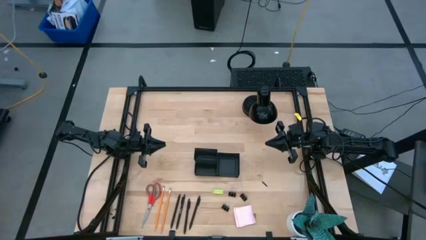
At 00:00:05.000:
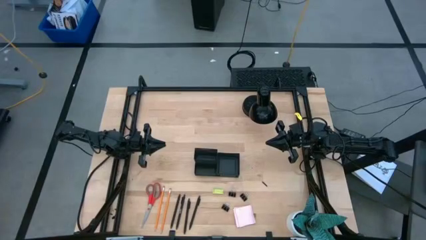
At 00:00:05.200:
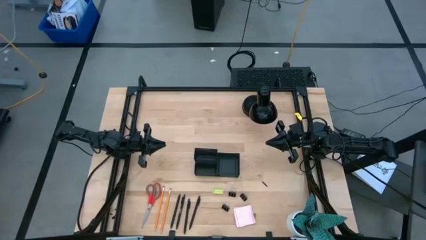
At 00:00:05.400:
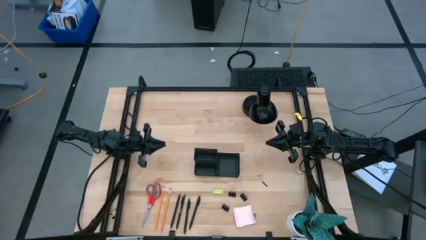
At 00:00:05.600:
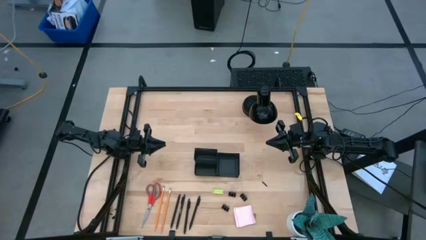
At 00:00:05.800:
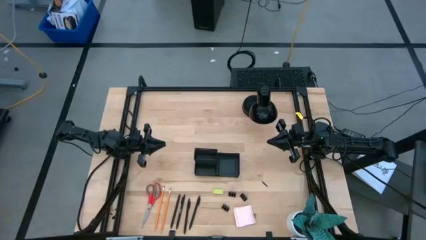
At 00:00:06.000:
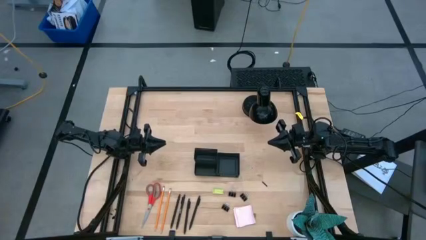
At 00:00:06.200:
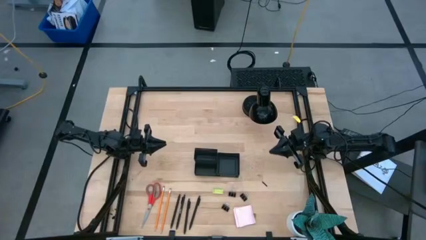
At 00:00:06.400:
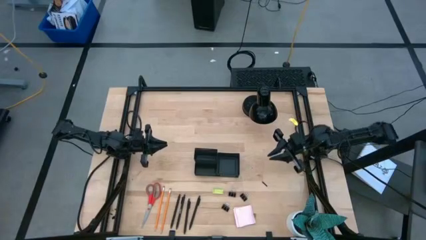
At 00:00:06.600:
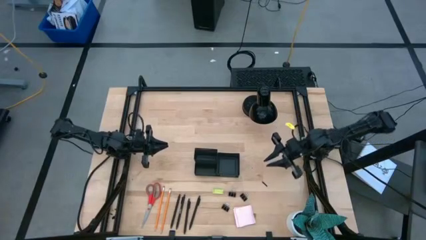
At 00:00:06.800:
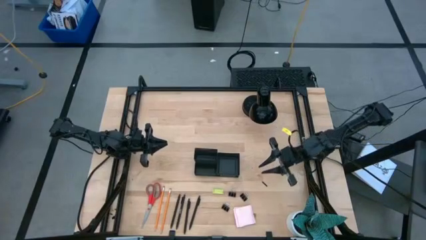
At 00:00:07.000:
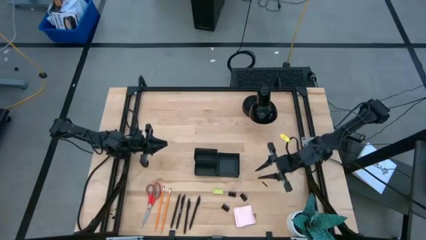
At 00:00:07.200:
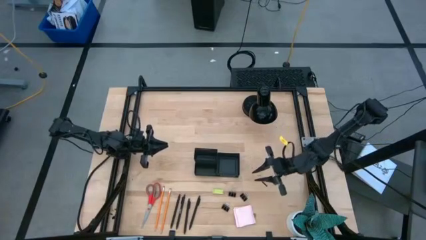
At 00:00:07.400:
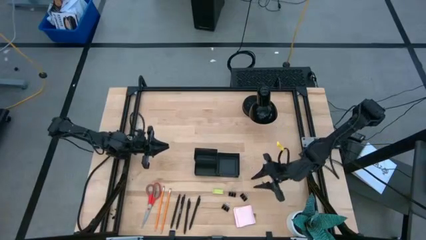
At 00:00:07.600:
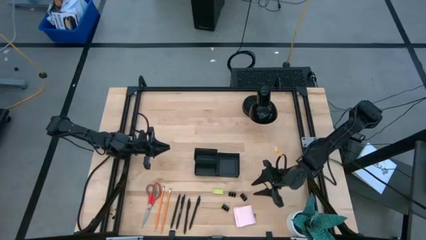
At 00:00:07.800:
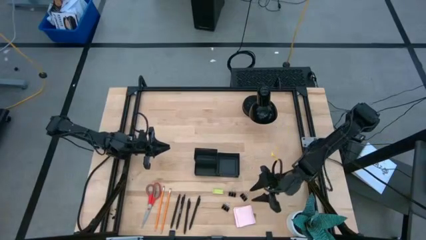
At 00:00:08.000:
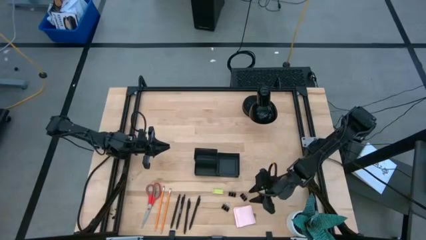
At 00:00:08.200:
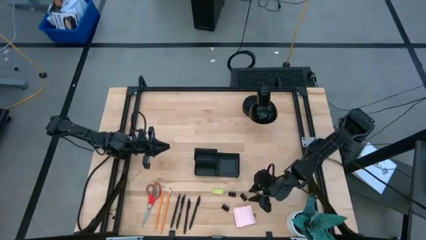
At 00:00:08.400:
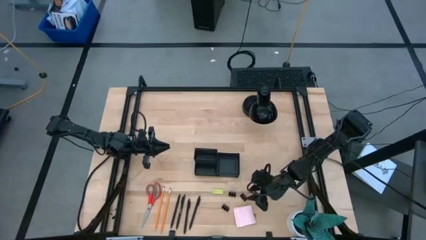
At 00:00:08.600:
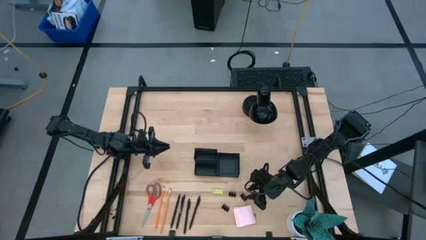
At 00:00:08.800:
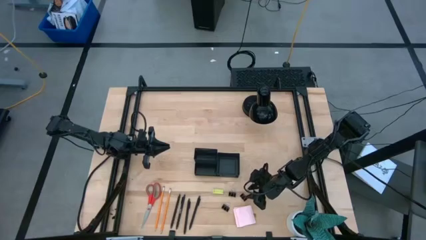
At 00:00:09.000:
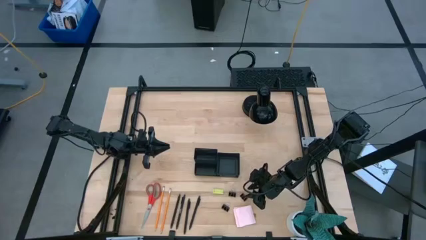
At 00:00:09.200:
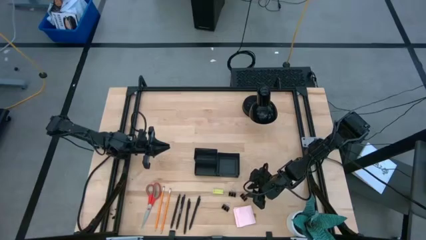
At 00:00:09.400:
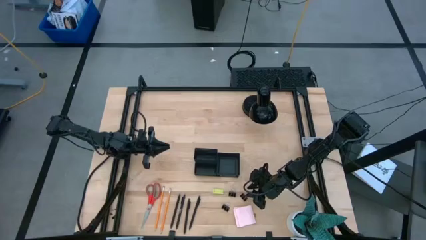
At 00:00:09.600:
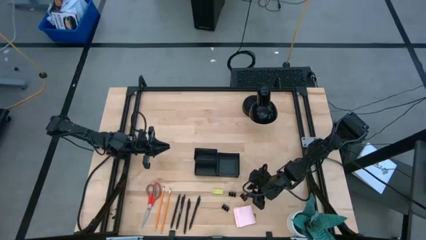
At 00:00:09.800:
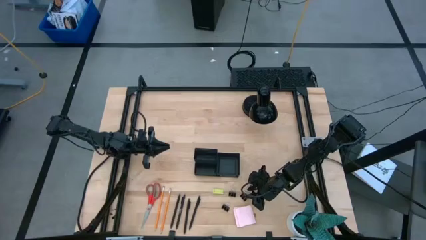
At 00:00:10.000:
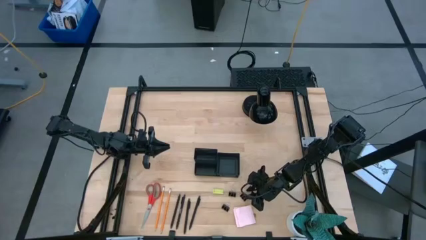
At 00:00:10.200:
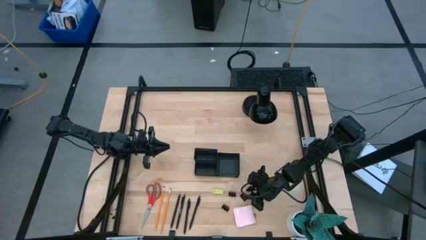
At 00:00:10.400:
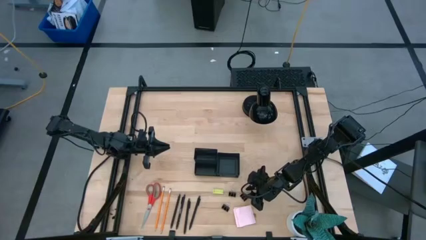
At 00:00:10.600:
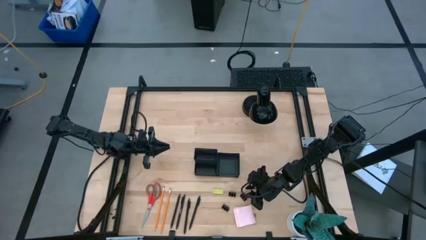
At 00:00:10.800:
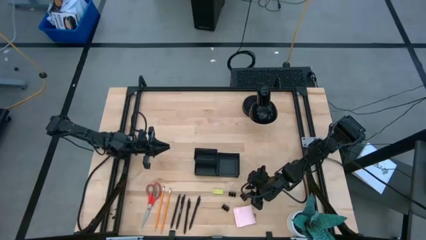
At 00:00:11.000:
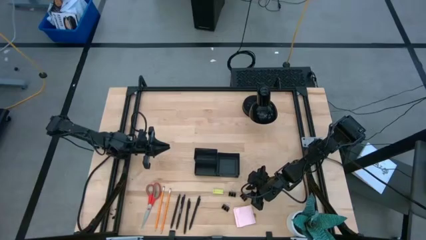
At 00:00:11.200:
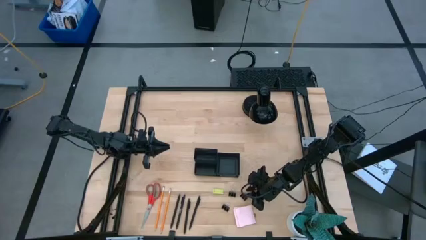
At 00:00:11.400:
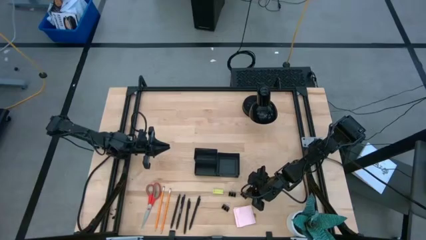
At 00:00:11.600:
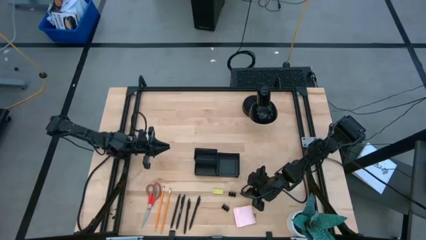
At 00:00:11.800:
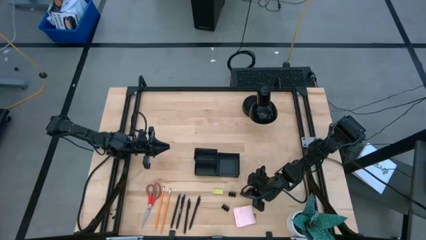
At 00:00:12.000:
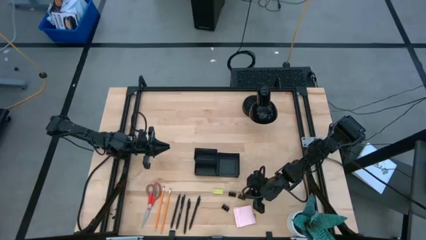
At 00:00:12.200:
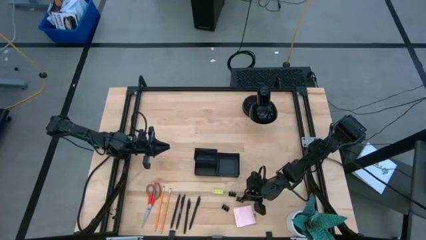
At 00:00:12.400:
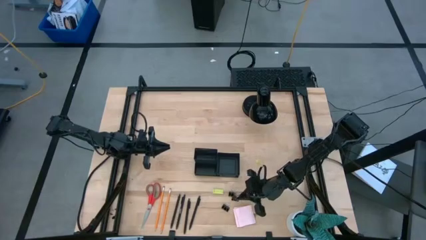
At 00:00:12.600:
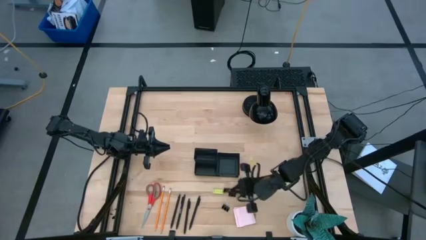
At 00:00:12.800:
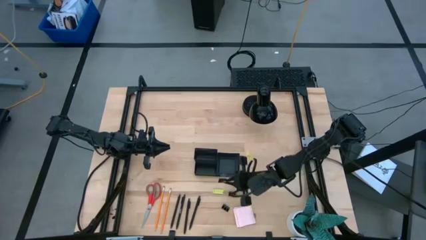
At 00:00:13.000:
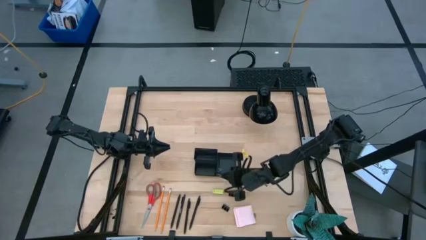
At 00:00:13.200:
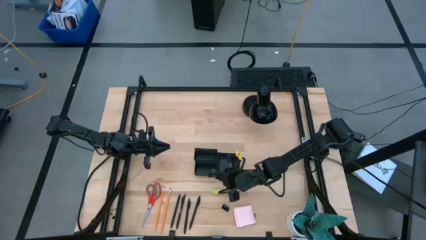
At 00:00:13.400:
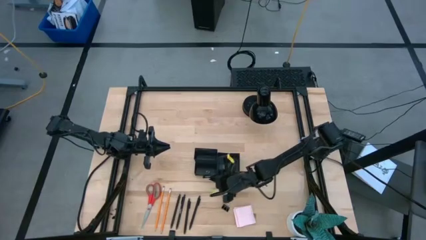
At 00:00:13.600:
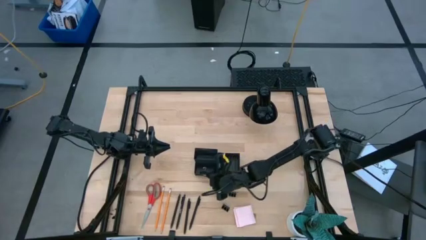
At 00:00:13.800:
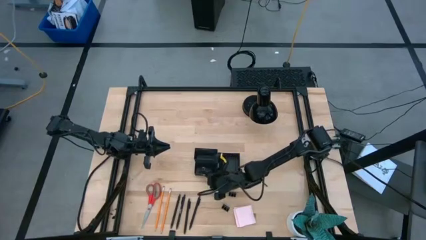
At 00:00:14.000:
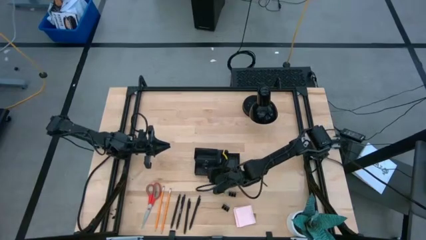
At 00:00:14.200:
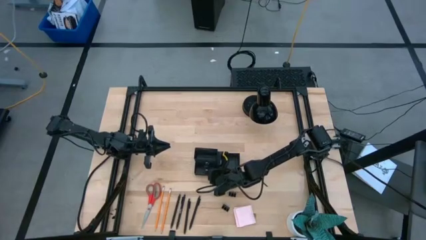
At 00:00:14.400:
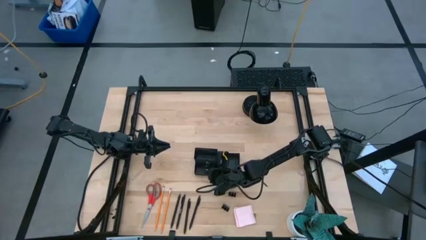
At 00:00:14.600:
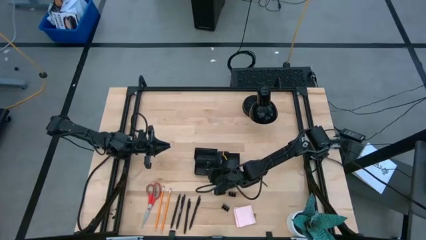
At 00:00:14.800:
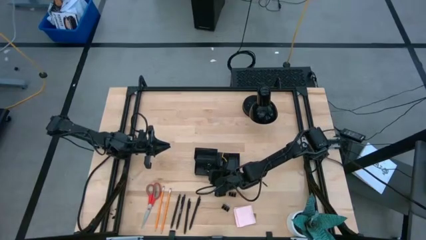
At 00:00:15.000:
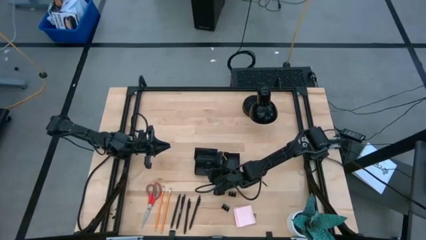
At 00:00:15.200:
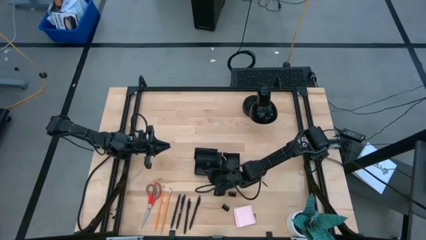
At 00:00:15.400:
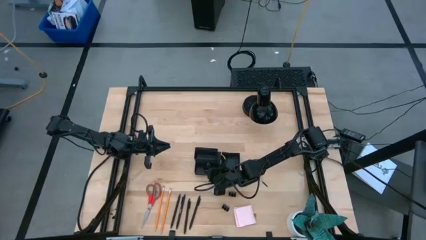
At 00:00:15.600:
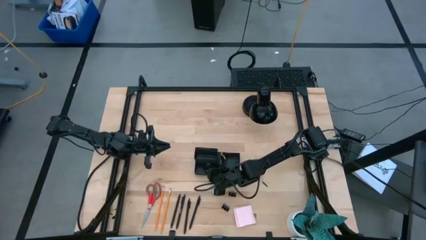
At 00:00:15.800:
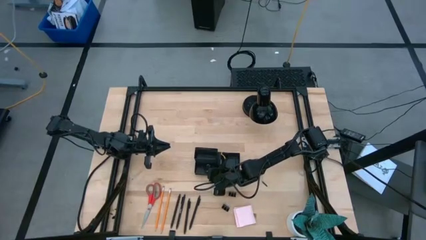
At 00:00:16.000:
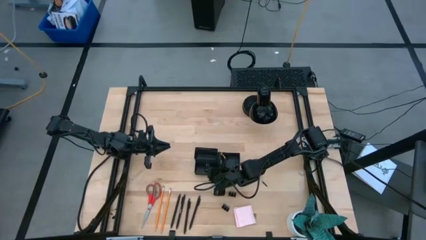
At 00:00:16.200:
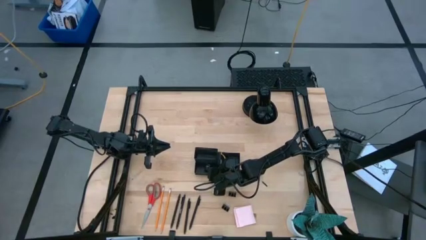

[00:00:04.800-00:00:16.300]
Task: Pick and place office supplies into organizer
Put the right black binder clip into the black desk organizer

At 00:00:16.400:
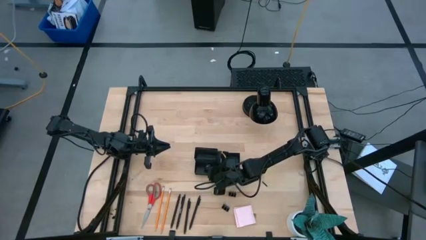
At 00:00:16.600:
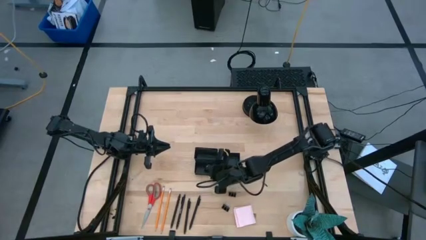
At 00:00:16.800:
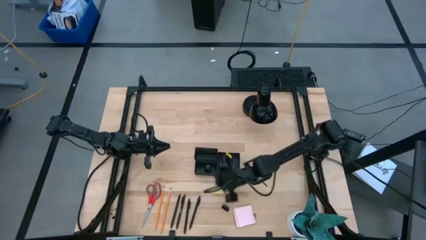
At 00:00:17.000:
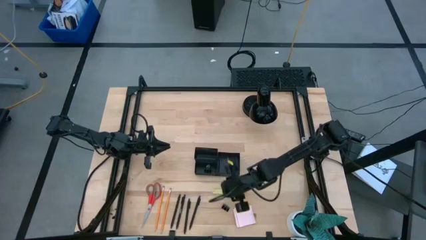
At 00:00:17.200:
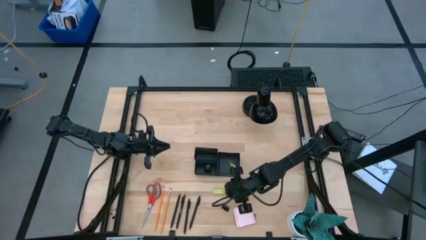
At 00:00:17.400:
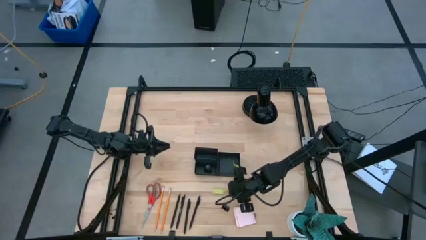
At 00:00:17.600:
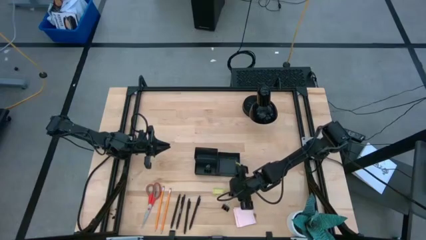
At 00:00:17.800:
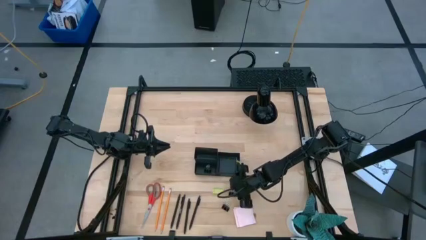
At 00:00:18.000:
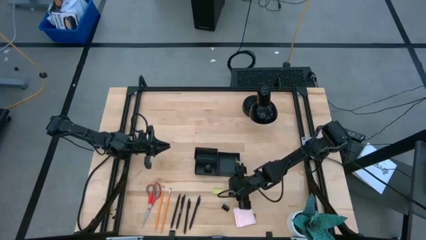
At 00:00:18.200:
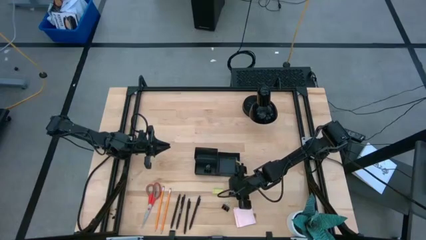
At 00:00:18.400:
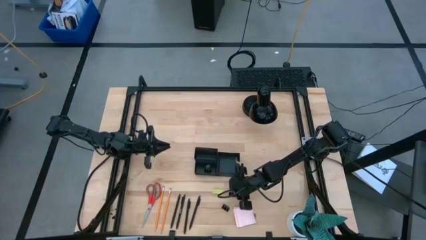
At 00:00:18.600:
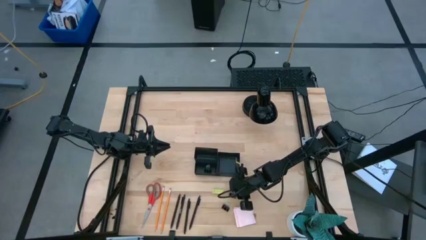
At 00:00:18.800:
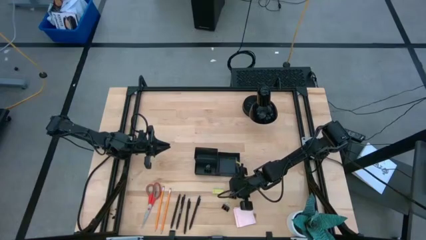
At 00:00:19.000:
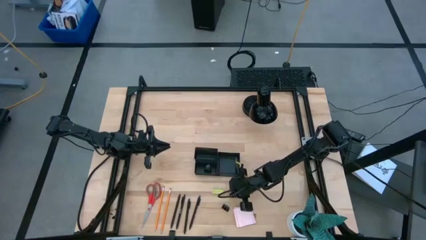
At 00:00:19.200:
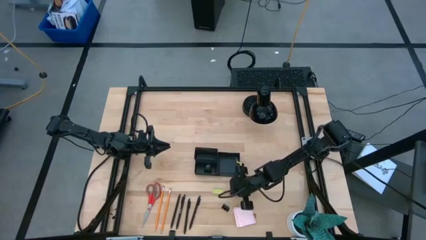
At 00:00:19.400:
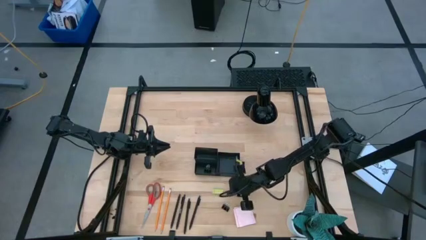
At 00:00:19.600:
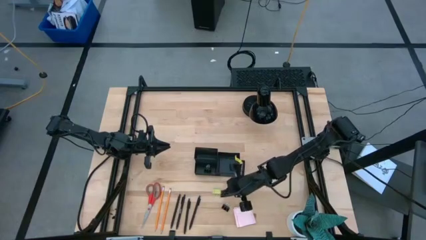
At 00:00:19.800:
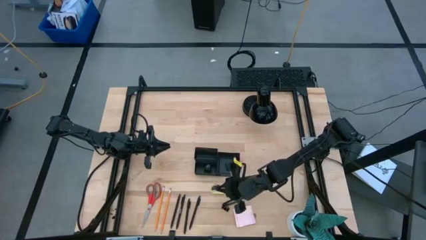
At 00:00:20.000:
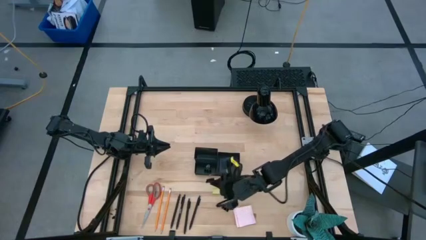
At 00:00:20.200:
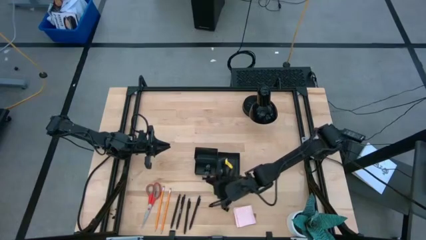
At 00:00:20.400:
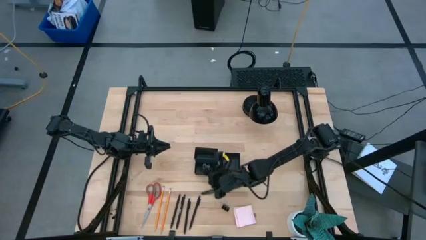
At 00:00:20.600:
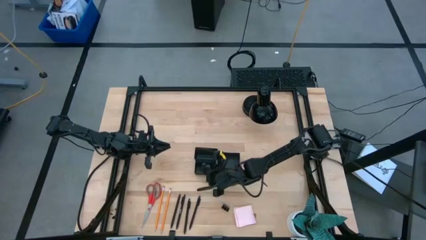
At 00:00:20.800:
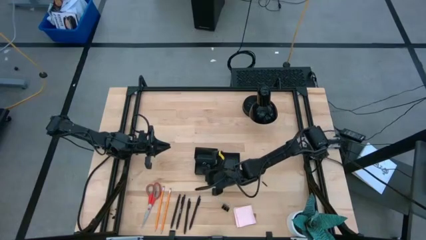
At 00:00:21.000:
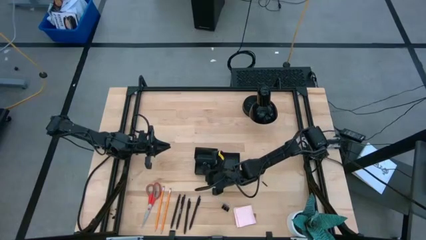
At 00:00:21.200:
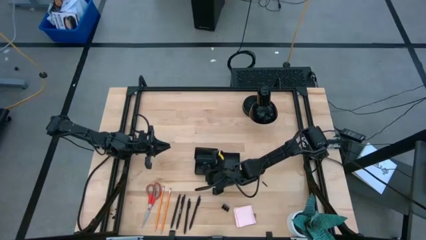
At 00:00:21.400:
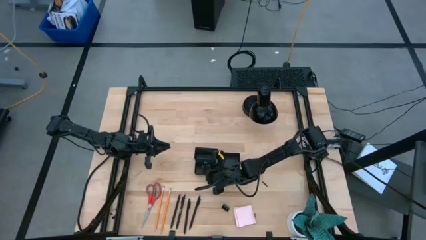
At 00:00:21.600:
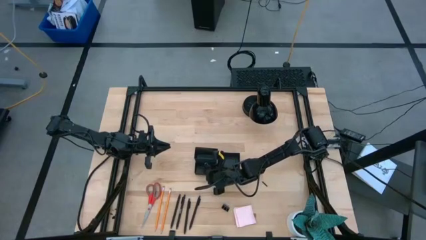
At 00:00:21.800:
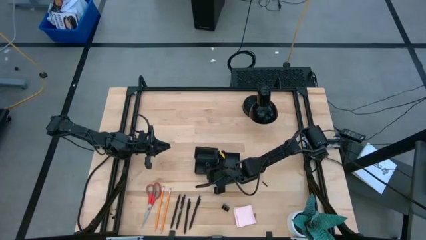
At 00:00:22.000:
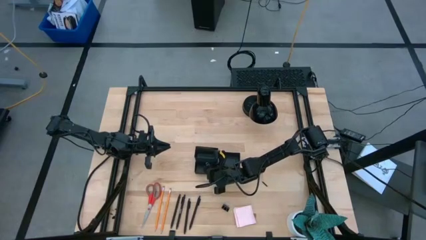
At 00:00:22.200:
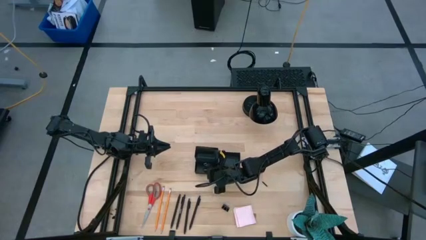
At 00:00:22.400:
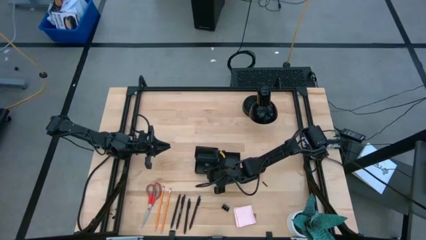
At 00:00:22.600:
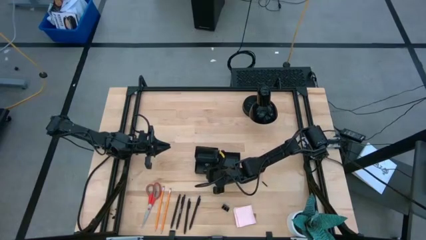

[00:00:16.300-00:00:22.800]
Put the right black binder clip into the black desk organizer
